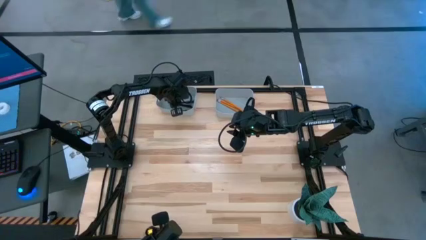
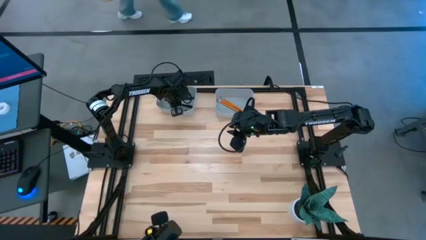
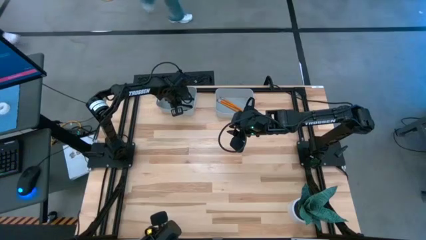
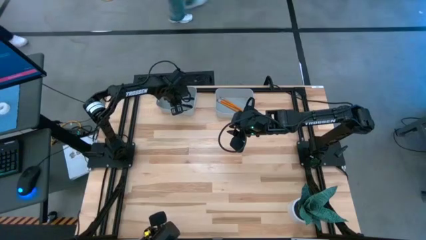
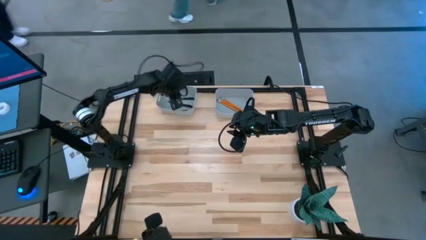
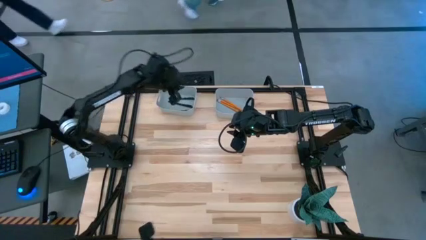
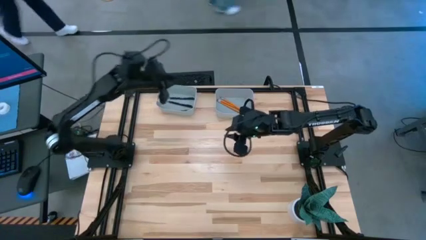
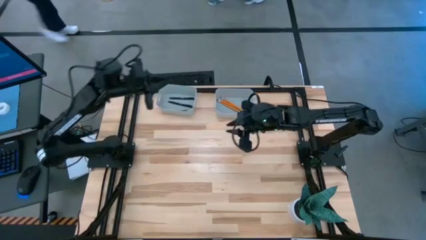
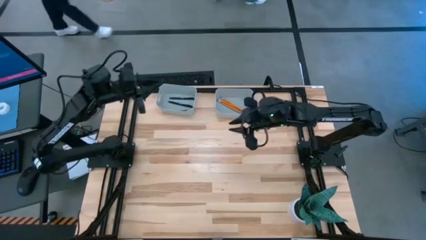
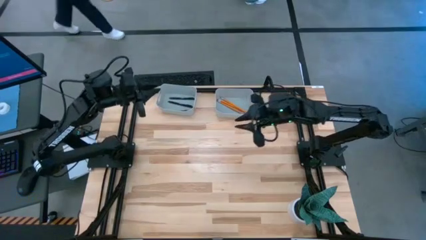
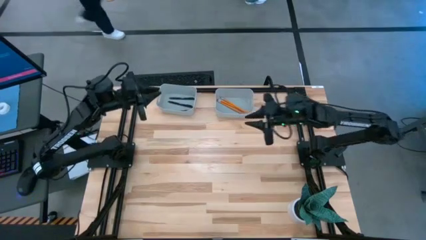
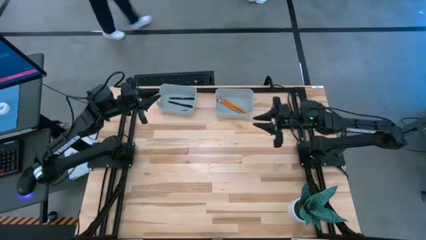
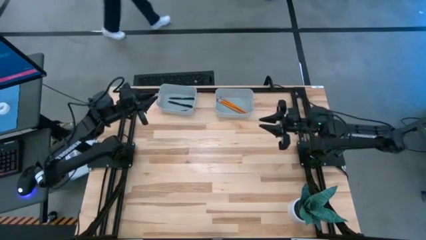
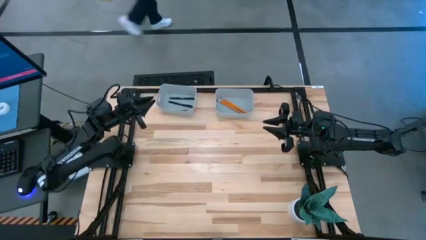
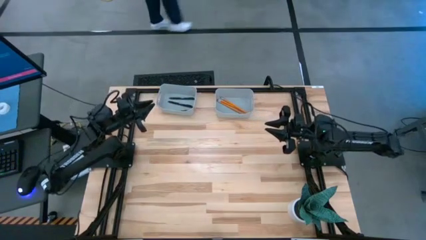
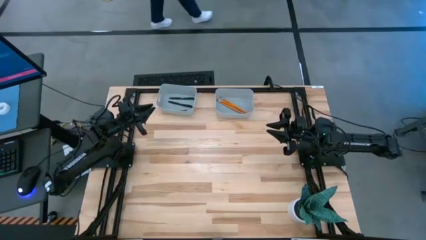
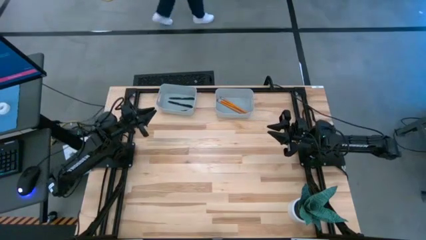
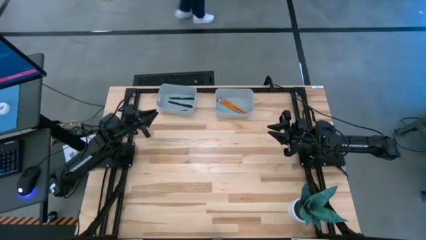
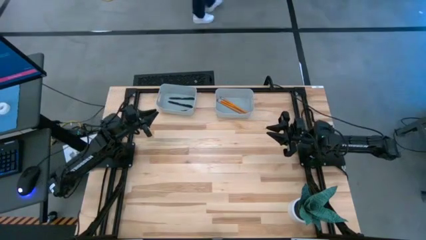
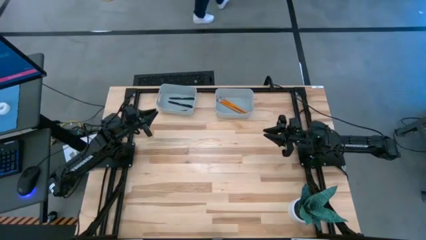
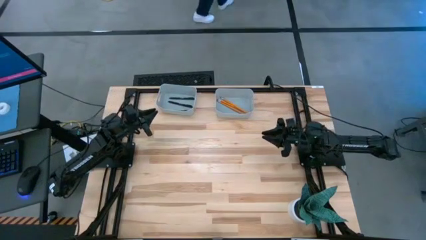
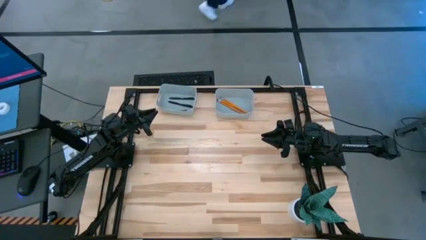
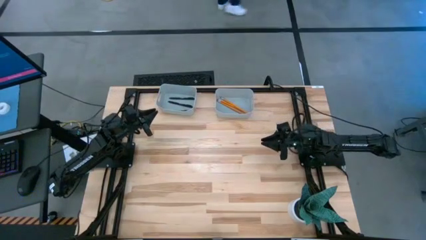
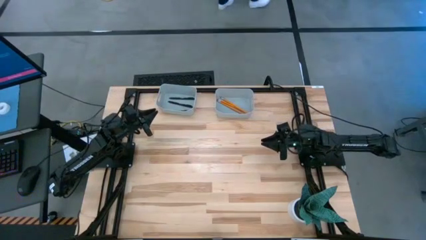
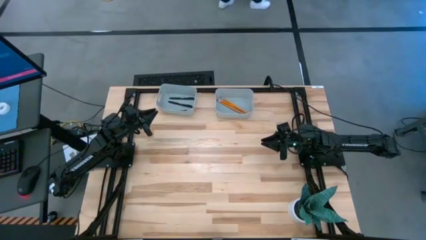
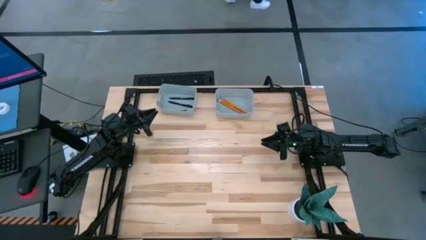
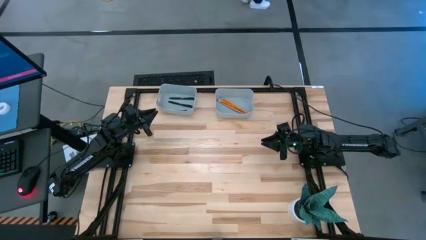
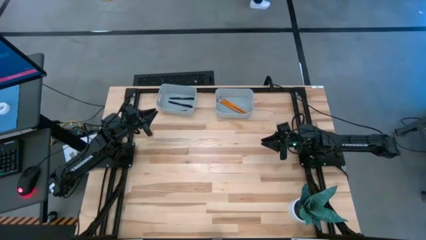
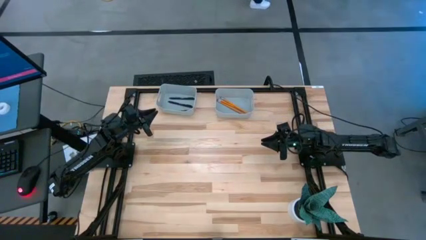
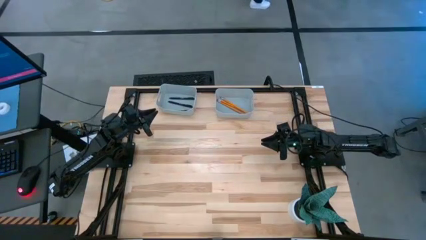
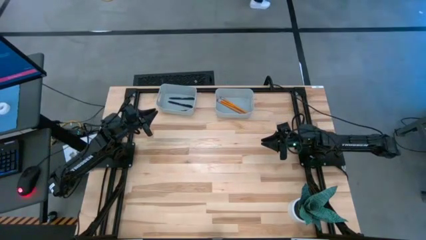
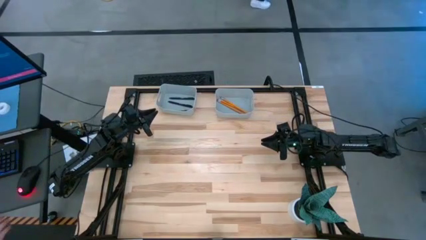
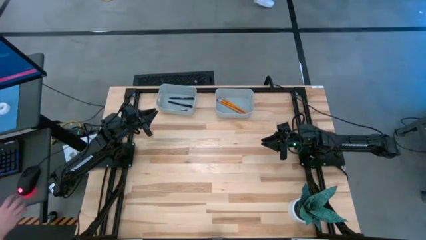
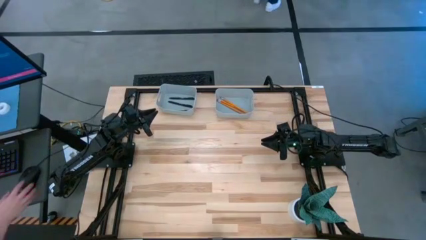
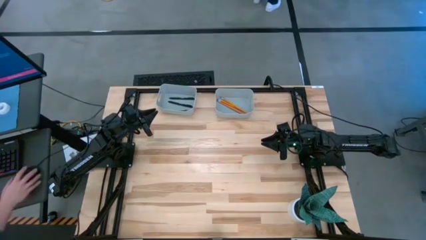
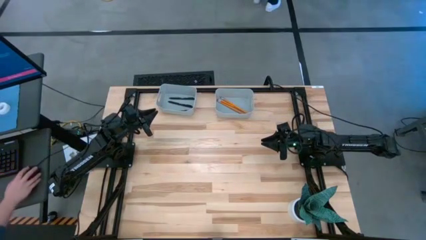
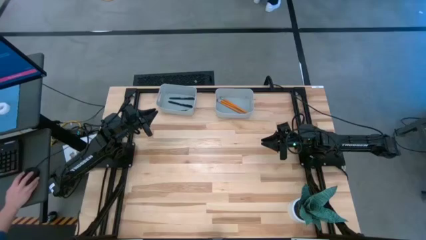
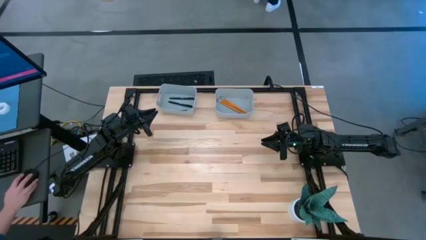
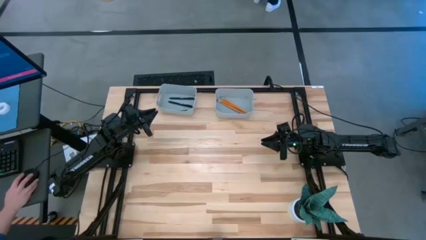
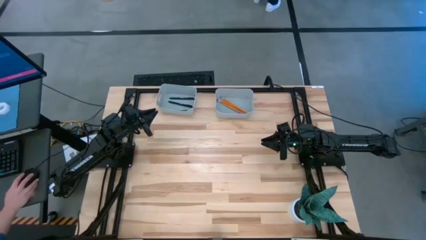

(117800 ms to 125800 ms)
Task: Sort pens & pencils
Return to home position

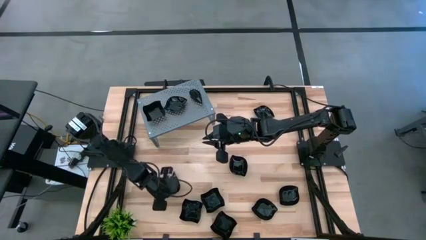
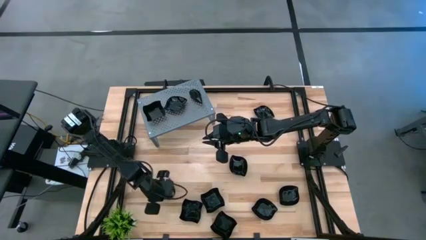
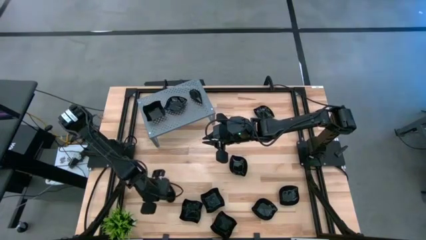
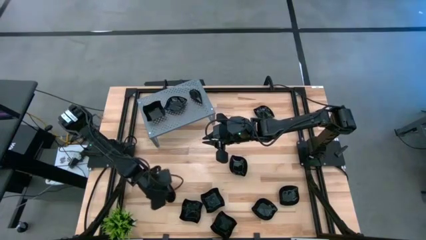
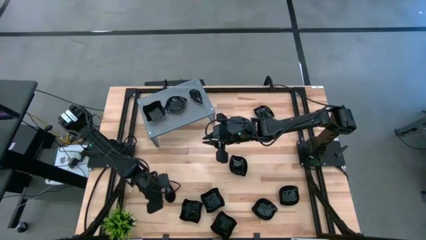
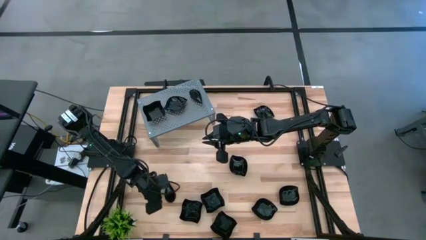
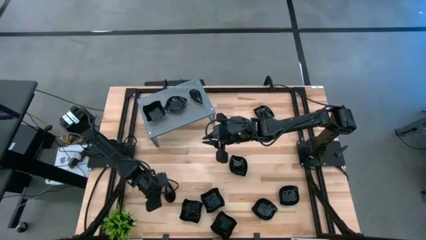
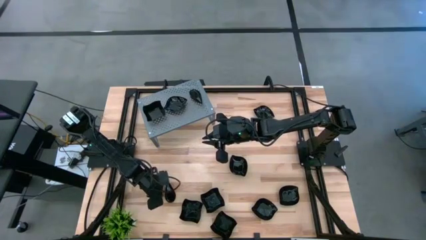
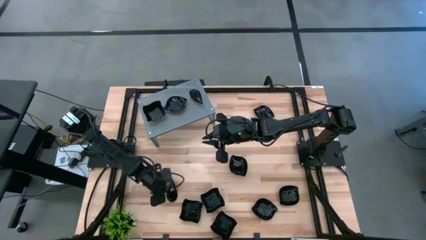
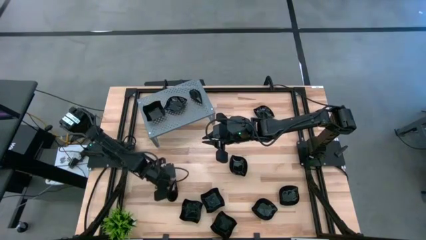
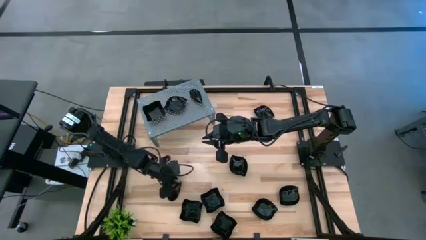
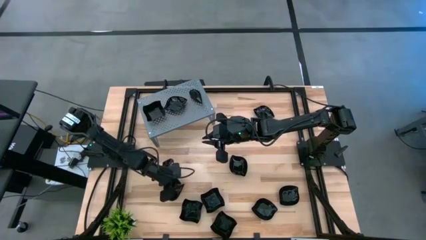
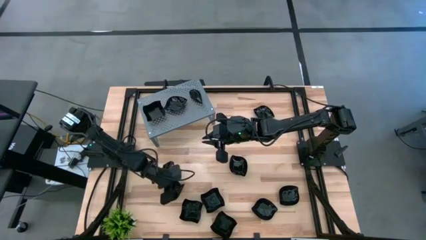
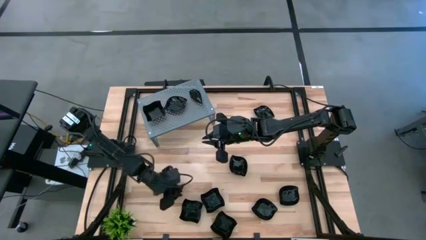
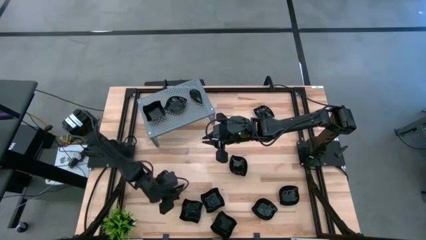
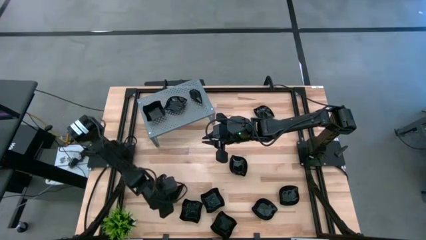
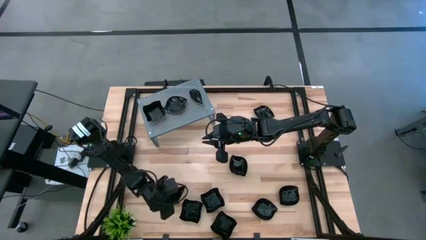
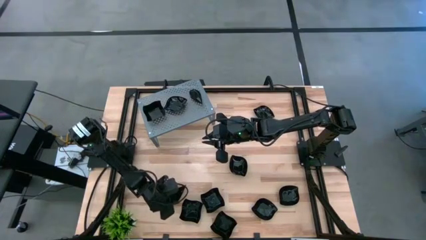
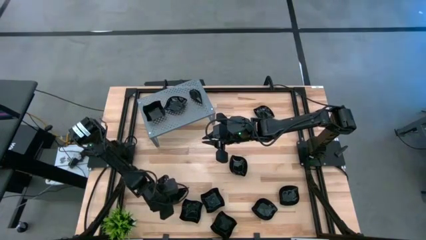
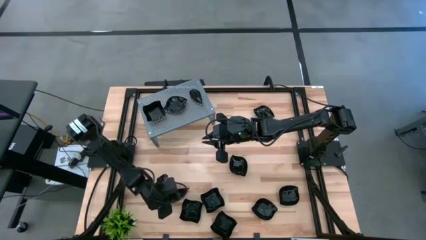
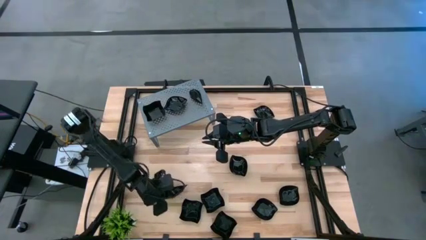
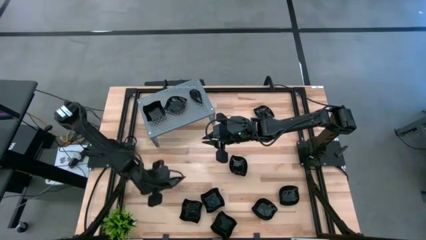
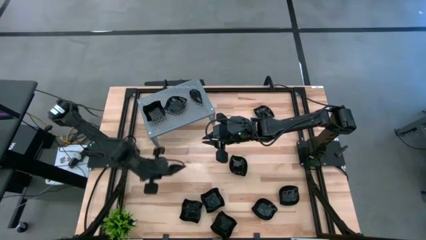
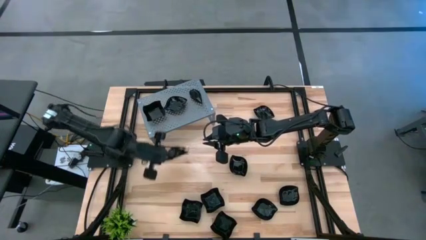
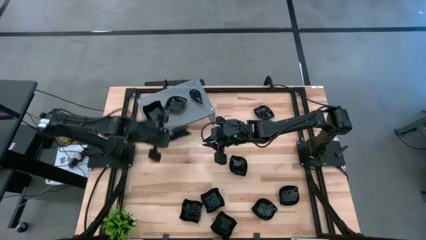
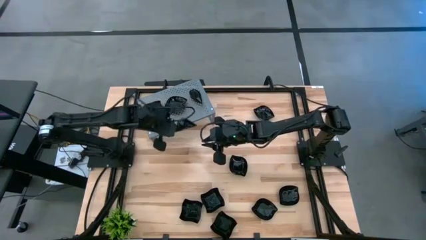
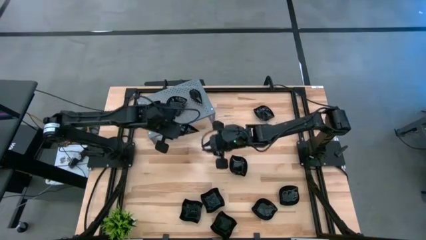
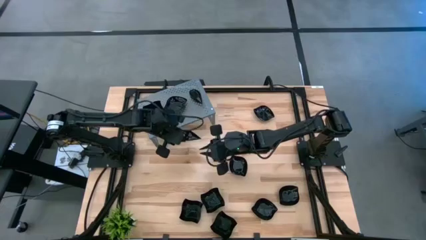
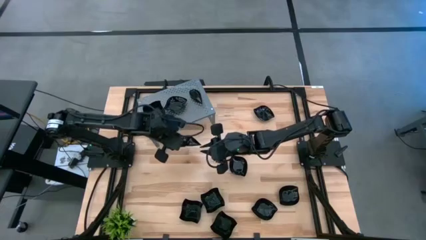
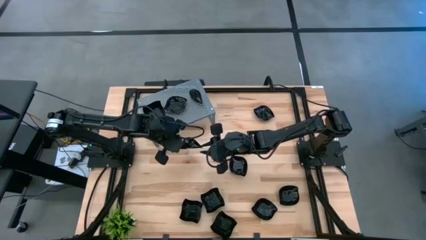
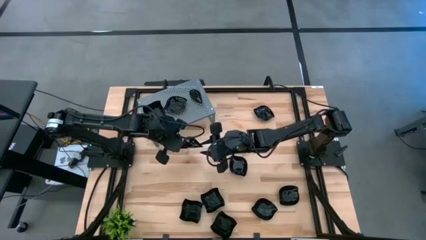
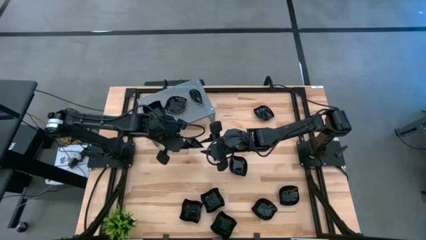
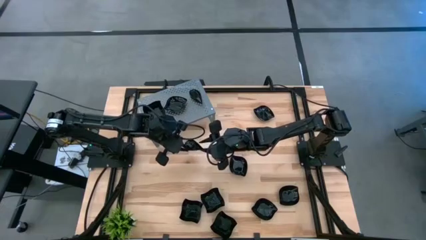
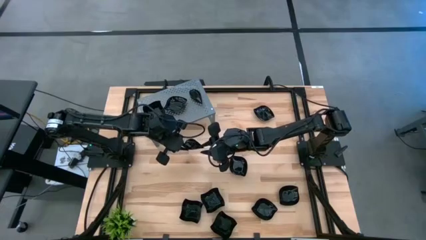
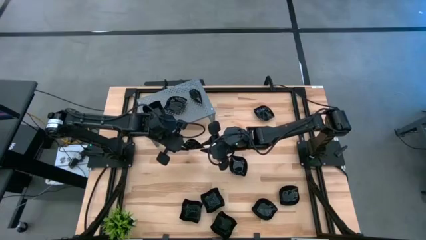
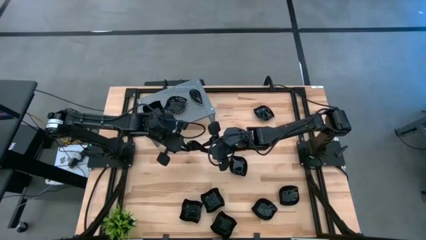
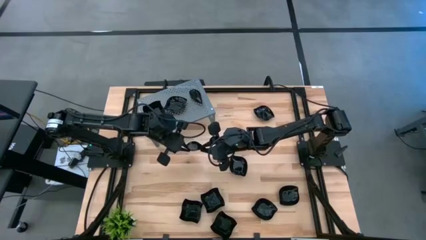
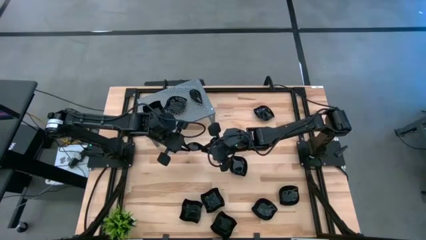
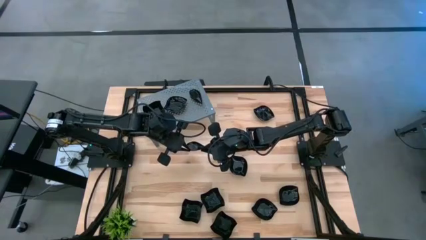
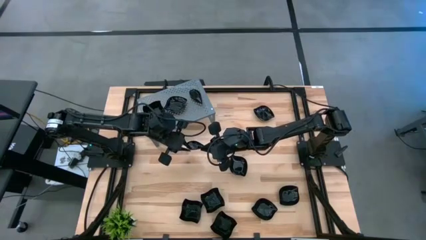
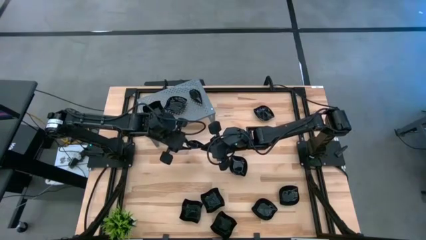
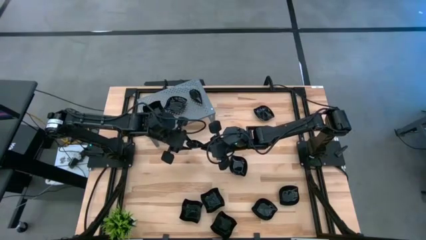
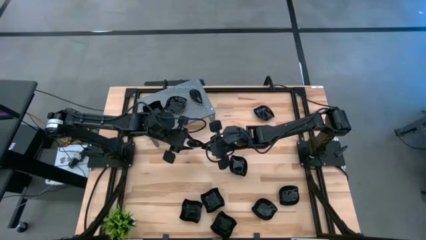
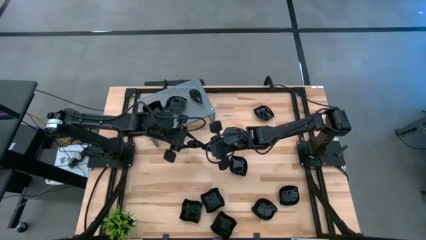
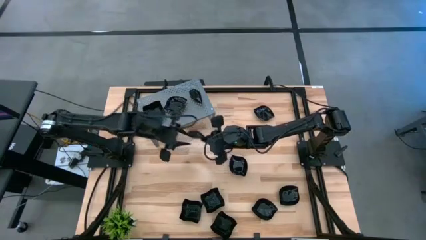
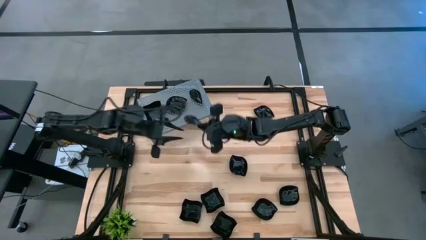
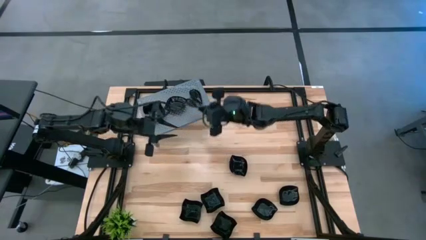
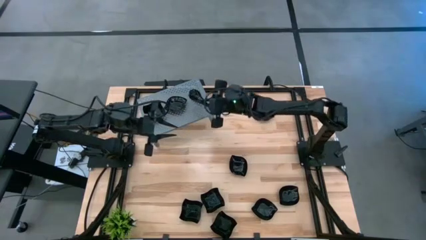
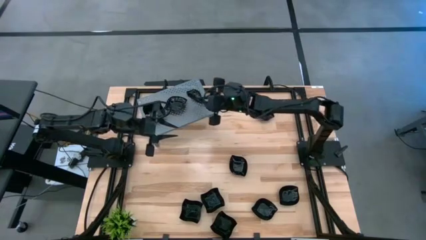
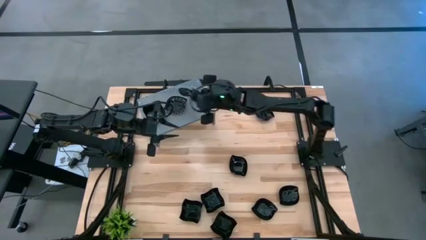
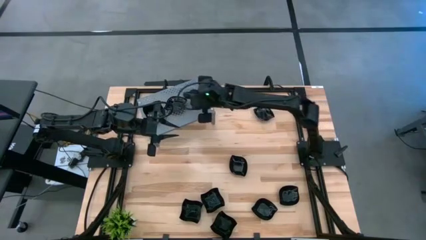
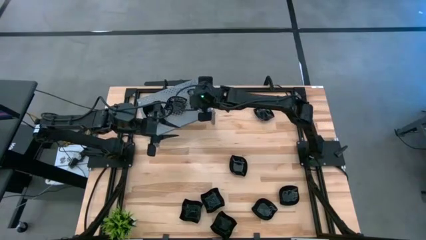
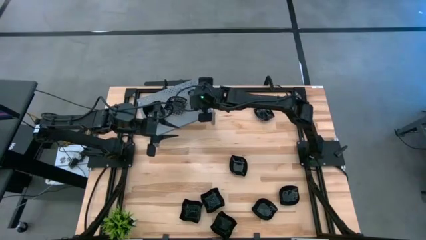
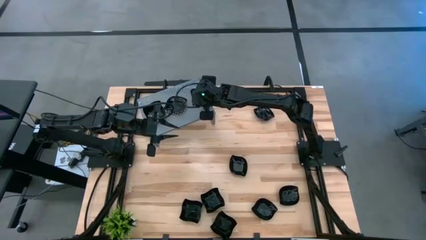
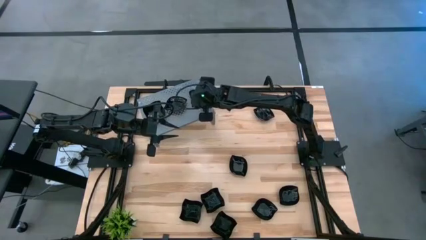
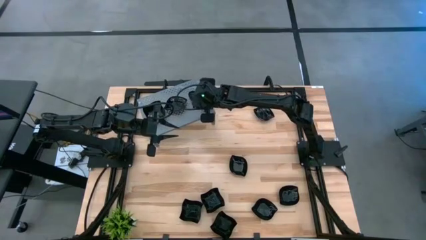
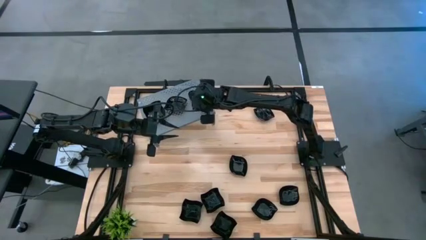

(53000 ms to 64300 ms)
Task: Pick & Place Mini shaped plates
Stack the black drop shaped plate on top of the black drop shaped plate on the shelf
